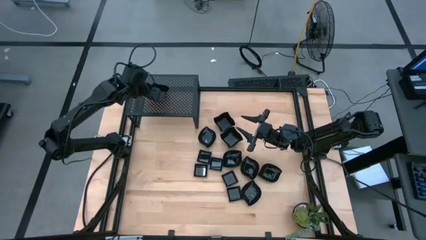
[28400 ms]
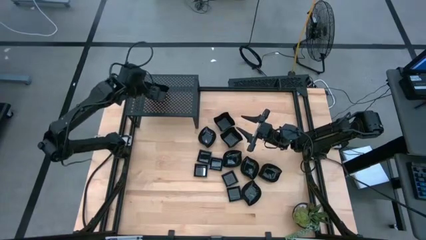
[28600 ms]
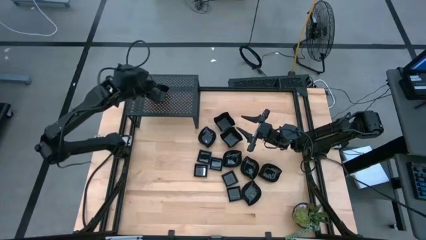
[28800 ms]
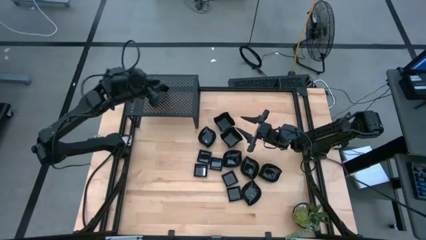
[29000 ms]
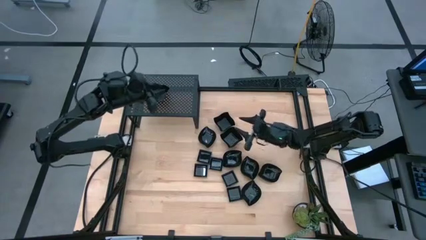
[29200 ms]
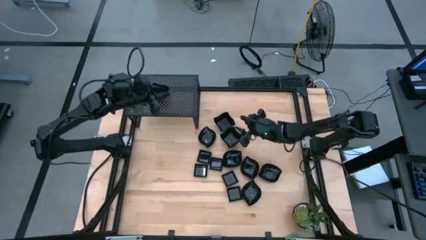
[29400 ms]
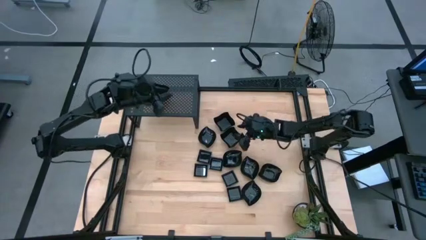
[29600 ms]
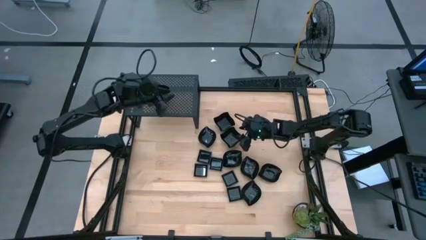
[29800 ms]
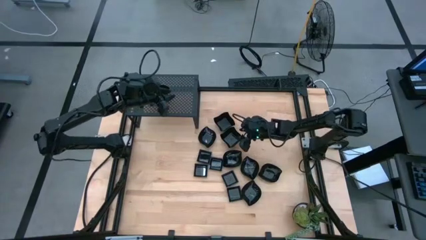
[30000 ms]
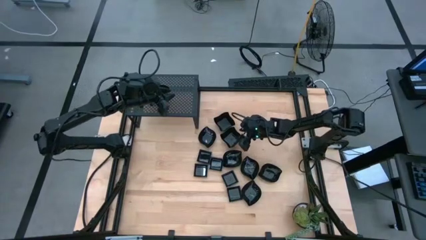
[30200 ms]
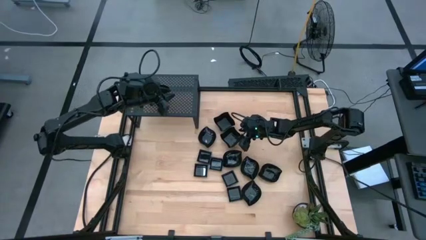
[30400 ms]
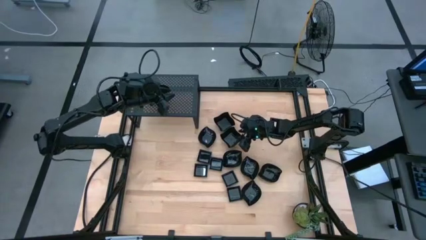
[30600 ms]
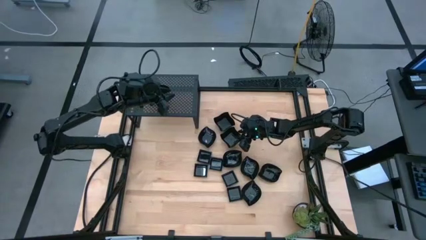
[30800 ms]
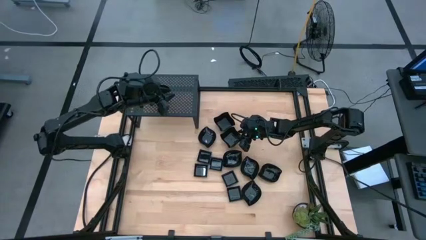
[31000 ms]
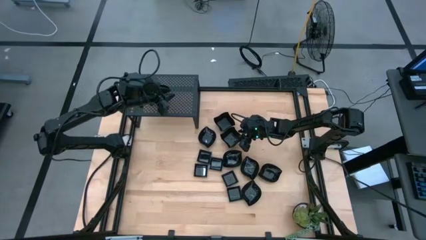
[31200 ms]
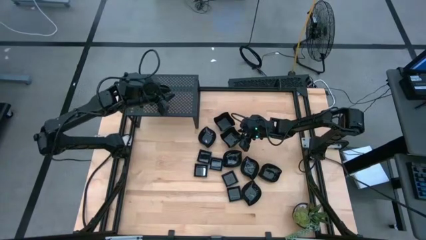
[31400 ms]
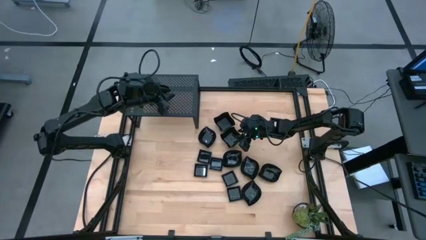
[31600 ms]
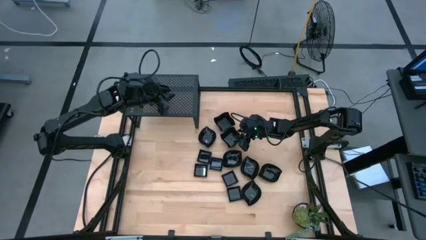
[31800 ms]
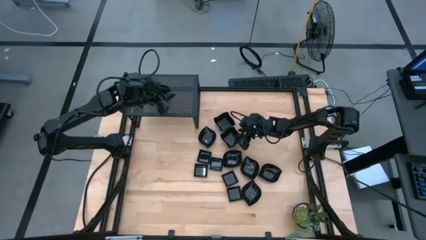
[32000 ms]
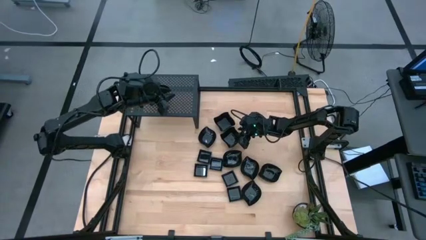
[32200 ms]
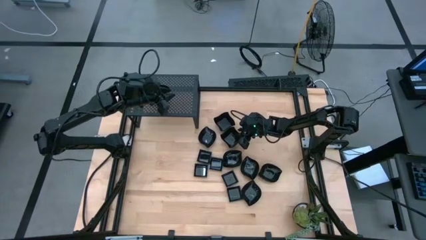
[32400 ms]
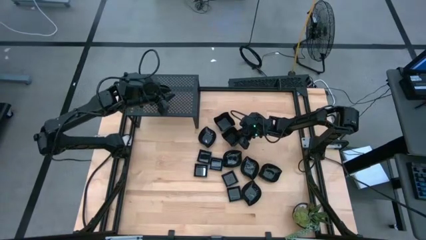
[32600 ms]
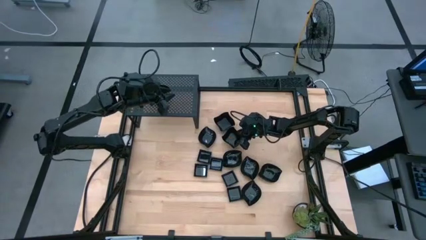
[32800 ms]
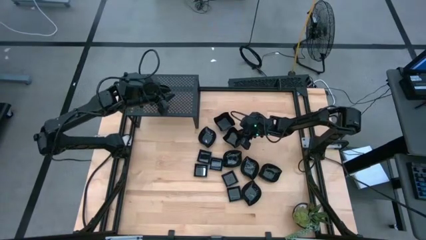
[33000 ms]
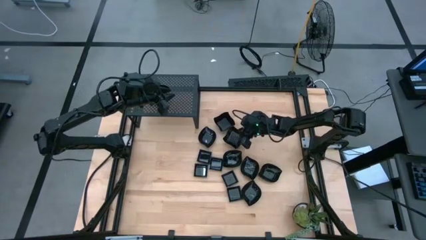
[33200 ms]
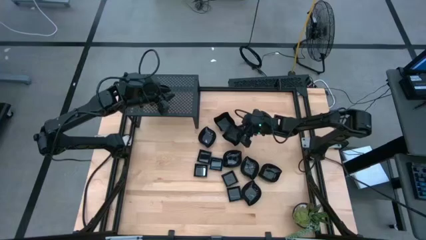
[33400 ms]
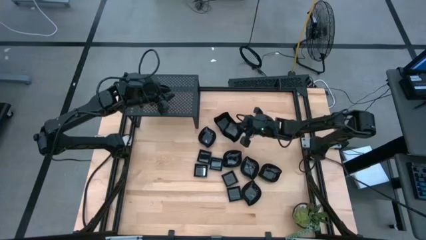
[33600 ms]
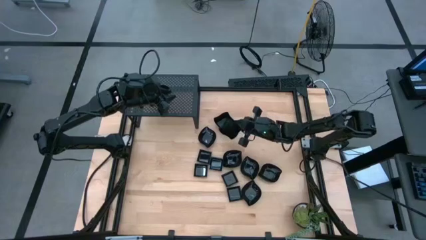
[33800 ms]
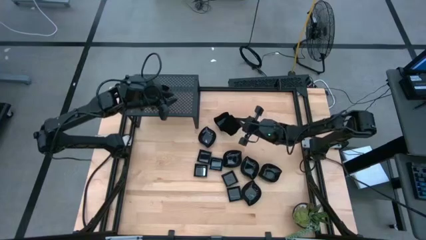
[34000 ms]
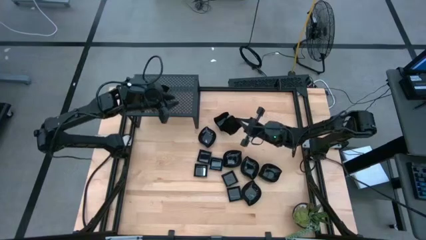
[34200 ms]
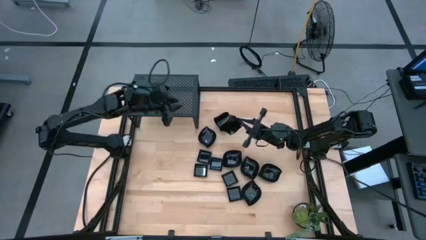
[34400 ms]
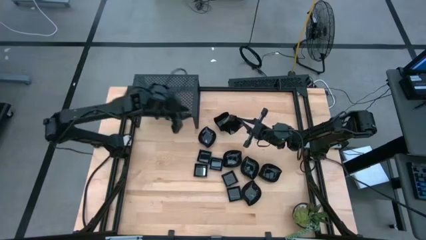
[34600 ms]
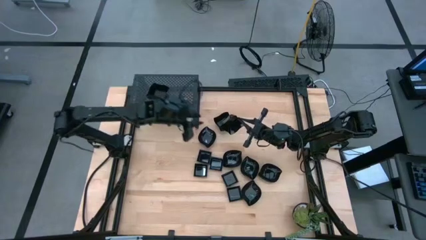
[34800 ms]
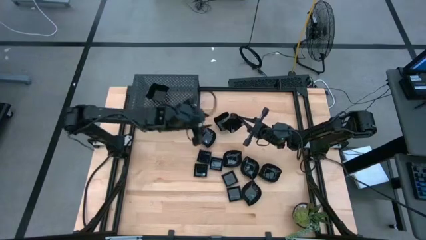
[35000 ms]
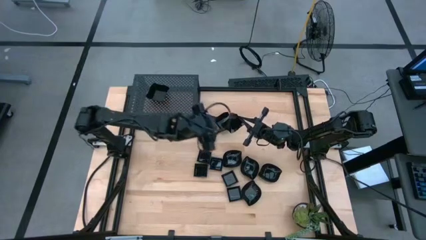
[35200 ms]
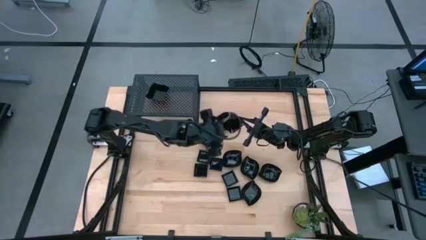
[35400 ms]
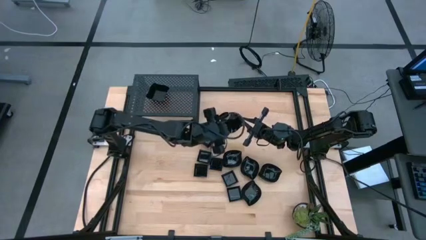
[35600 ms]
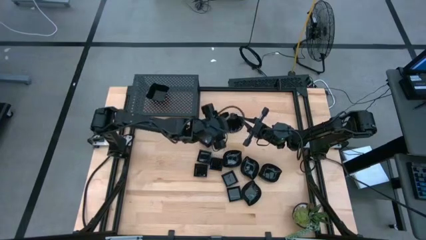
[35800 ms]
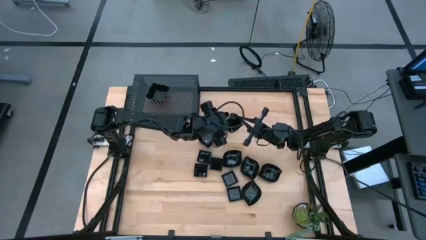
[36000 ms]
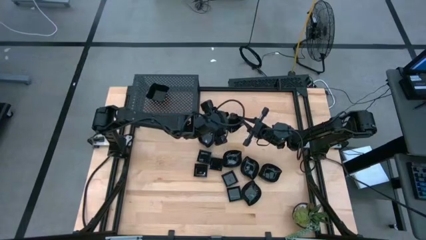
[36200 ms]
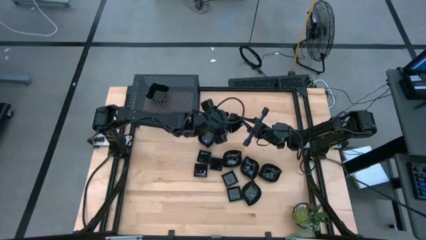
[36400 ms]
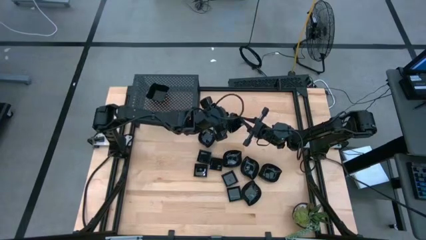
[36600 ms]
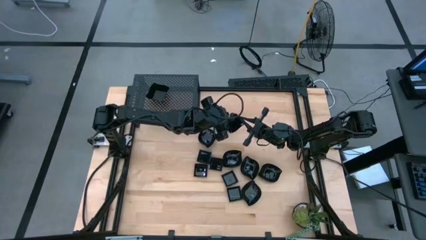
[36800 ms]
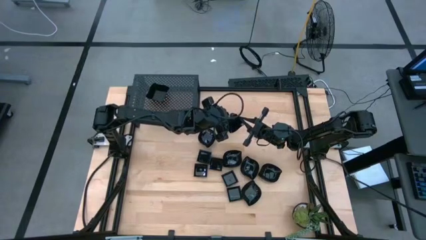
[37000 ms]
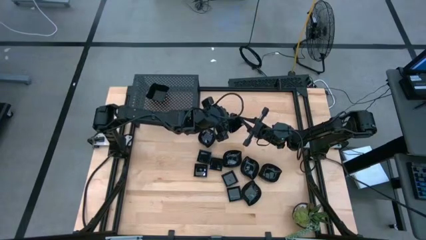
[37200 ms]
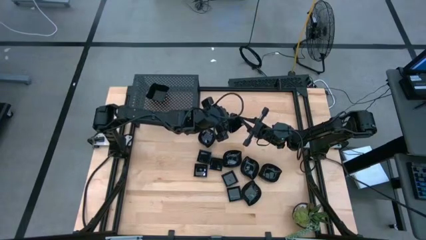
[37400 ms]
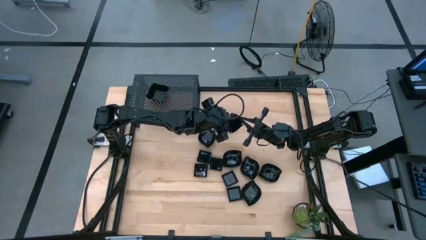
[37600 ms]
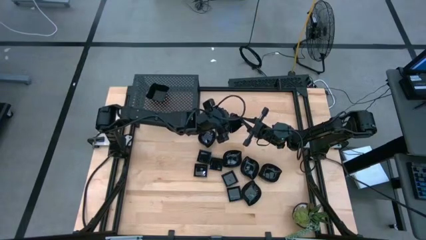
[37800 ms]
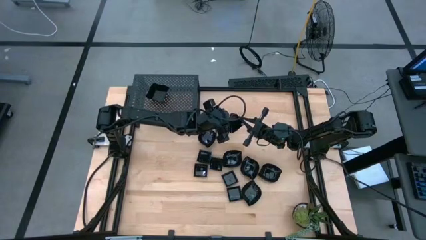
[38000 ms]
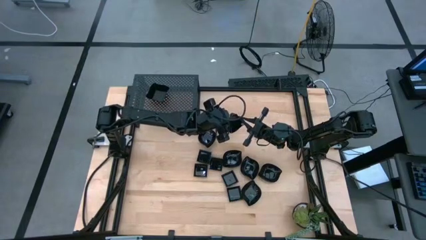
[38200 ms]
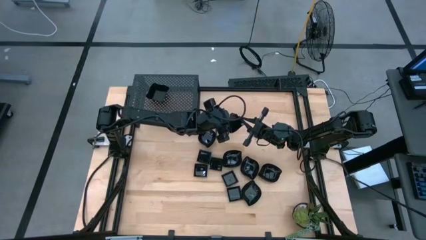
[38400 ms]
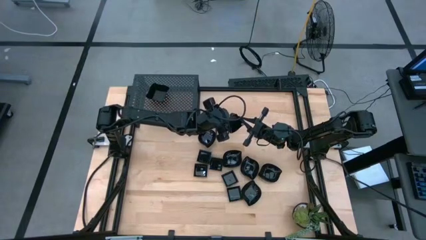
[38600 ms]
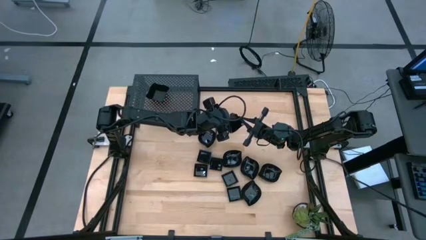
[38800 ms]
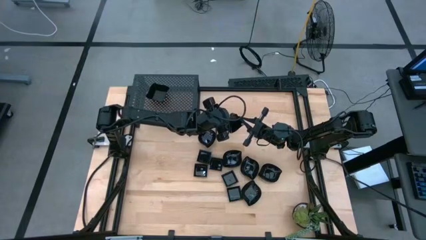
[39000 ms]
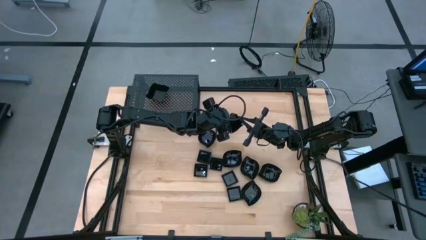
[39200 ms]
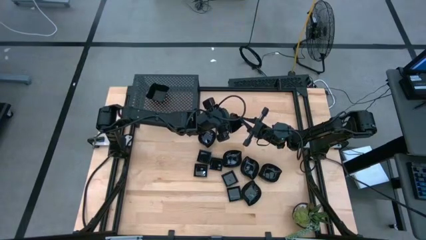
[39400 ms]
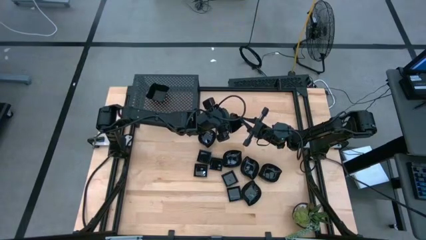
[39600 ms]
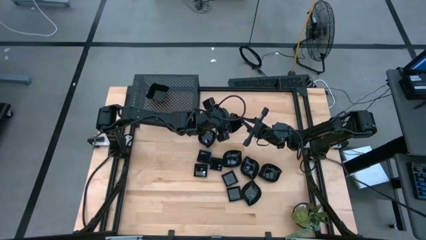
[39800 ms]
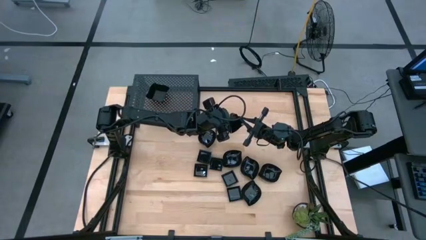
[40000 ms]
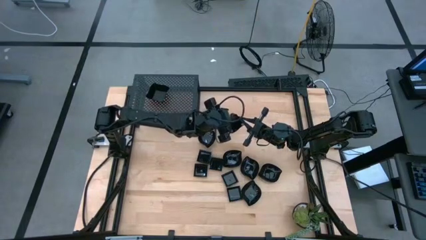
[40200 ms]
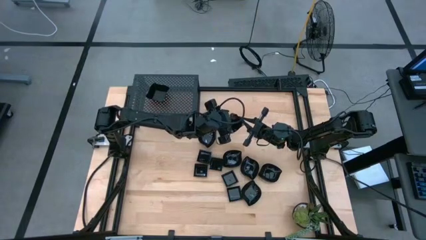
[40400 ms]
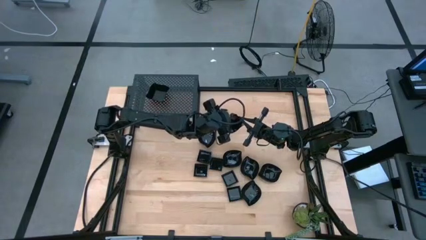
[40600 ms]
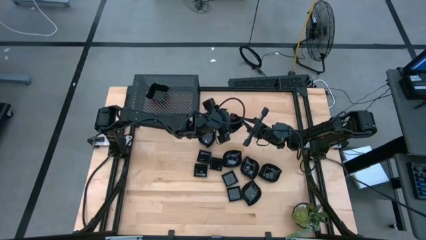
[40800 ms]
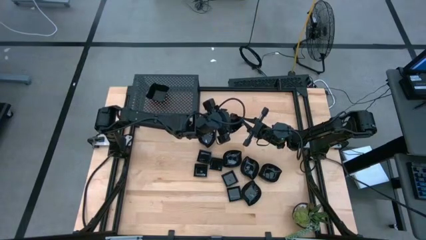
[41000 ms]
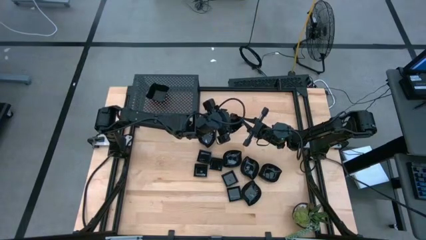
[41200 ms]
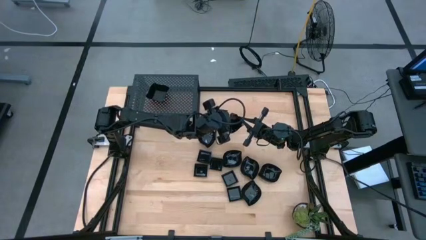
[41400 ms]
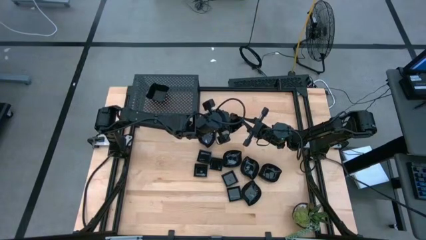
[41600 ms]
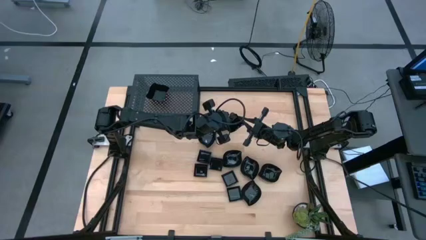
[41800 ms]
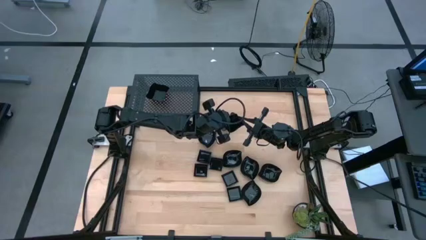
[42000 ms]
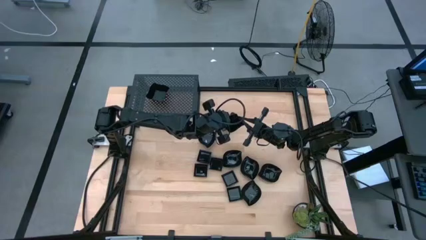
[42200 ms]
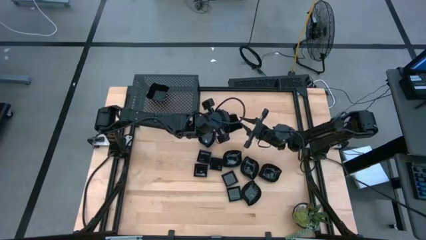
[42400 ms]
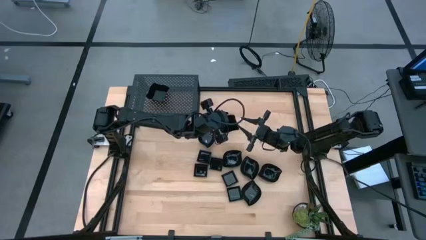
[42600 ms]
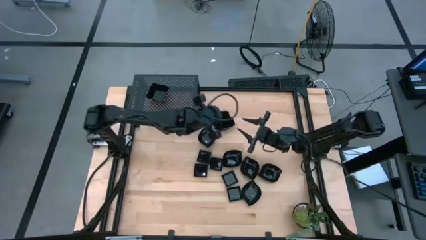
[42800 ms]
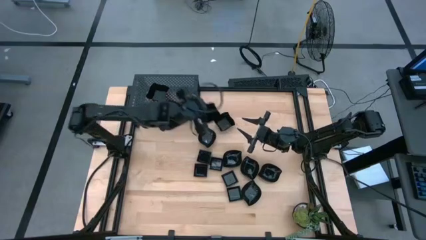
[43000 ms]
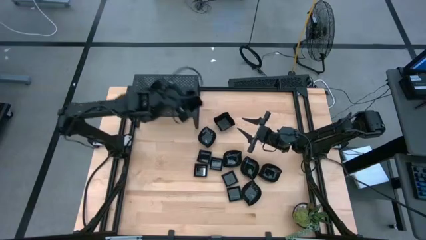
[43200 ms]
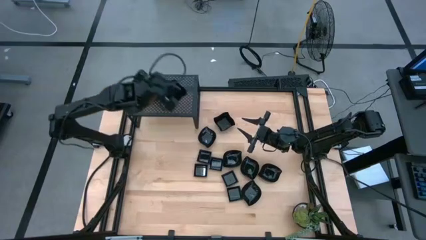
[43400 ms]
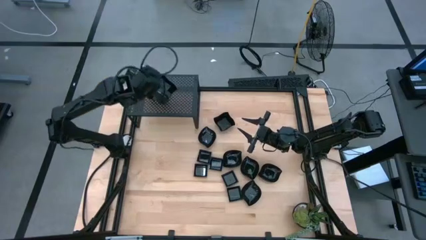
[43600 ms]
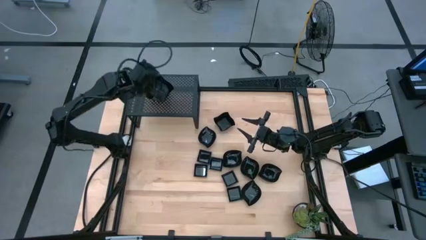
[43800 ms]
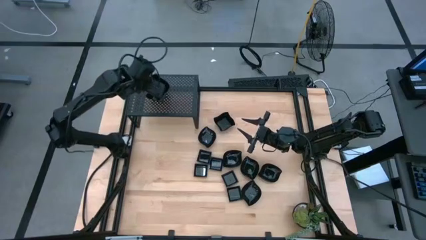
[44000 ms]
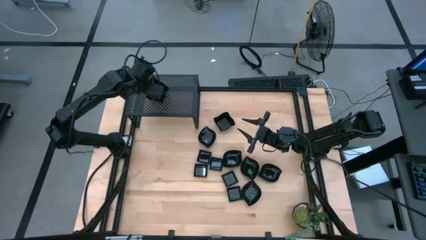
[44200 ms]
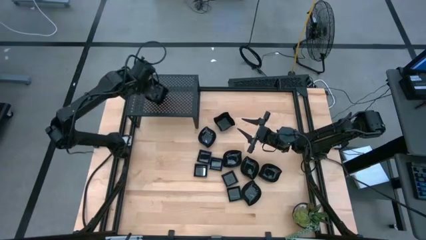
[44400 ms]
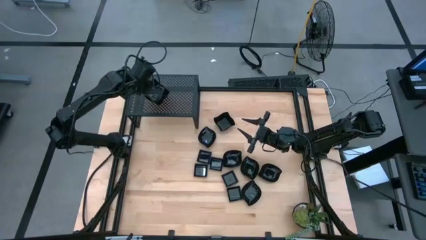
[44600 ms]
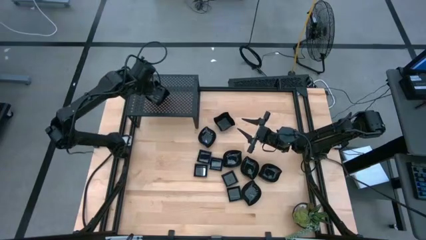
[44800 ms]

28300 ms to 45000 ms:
Task: Pick & Place Mini shaped plates
Stack the distorted square plate on top of the distorted square plate on the shelf
